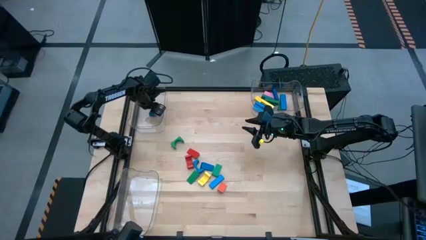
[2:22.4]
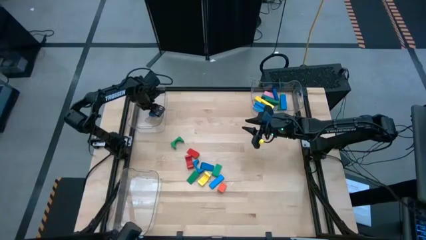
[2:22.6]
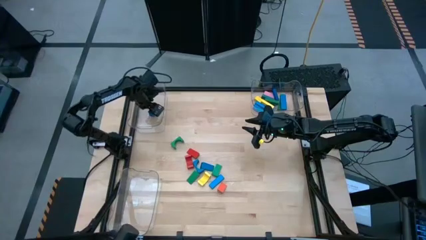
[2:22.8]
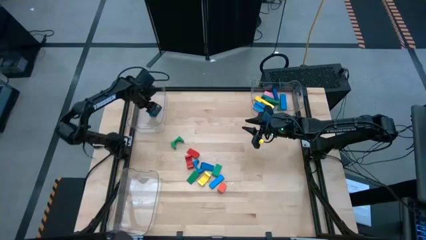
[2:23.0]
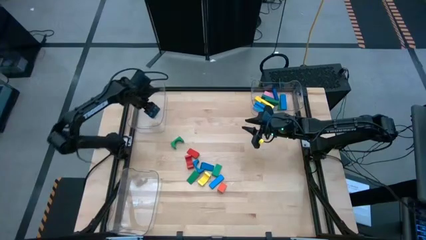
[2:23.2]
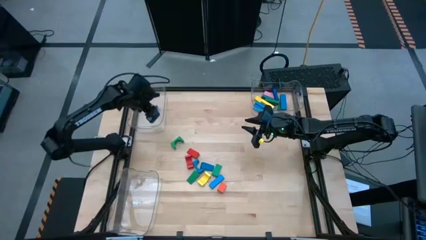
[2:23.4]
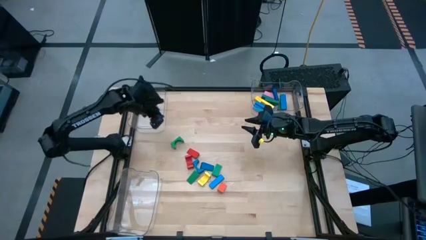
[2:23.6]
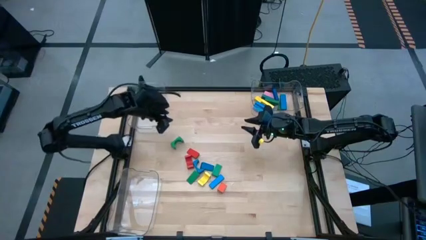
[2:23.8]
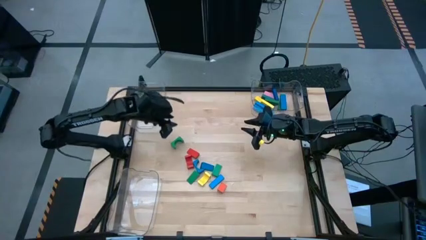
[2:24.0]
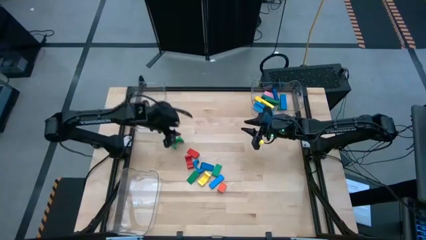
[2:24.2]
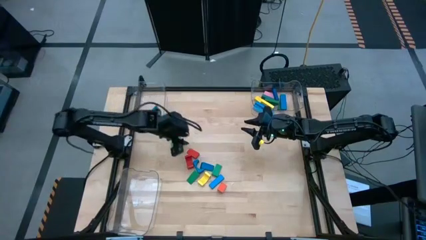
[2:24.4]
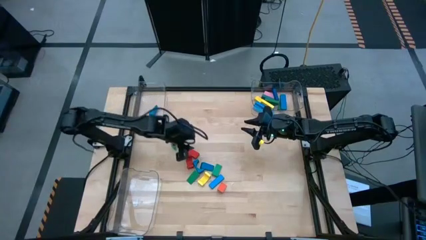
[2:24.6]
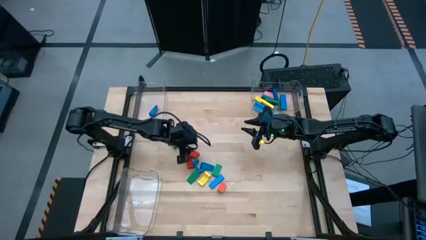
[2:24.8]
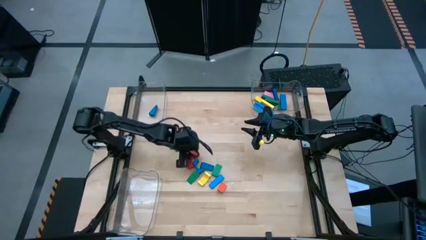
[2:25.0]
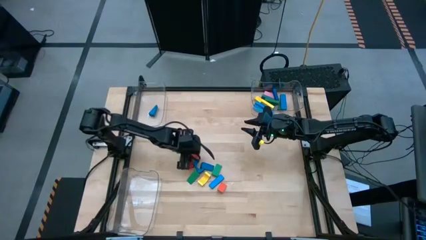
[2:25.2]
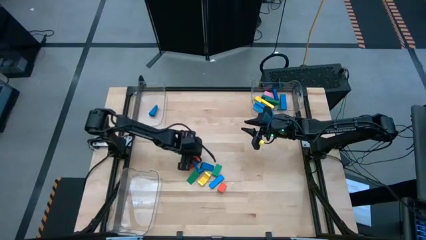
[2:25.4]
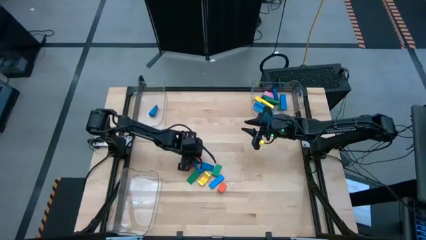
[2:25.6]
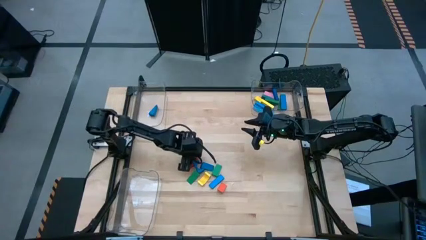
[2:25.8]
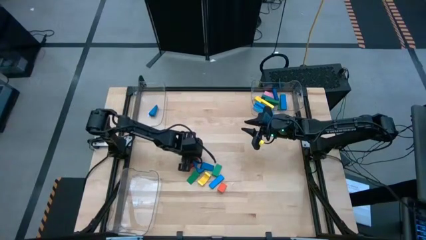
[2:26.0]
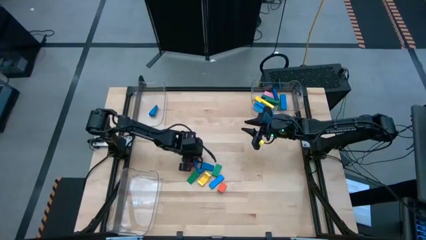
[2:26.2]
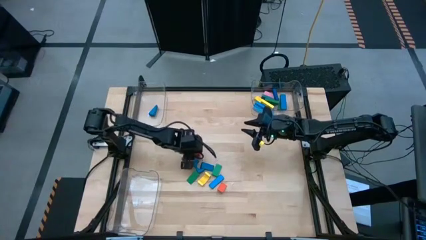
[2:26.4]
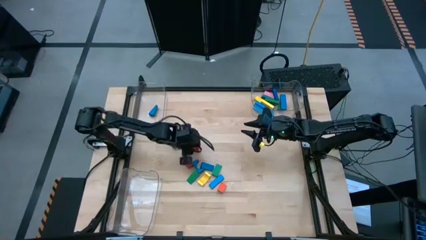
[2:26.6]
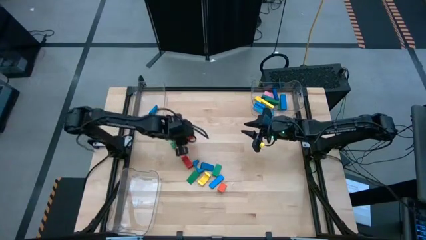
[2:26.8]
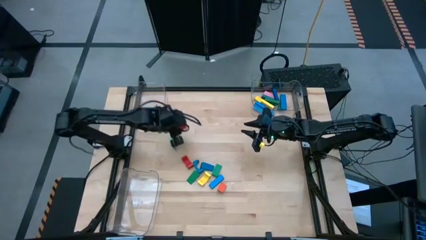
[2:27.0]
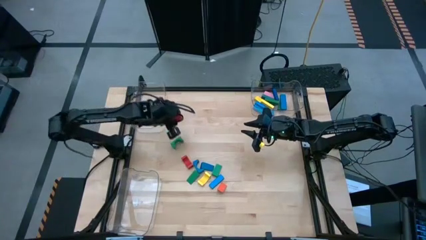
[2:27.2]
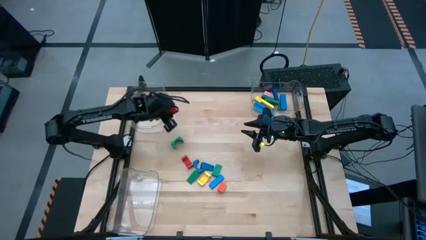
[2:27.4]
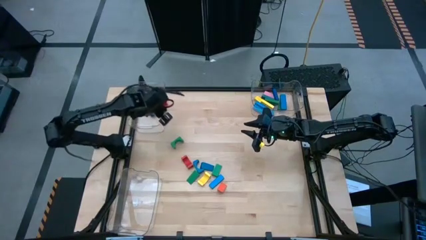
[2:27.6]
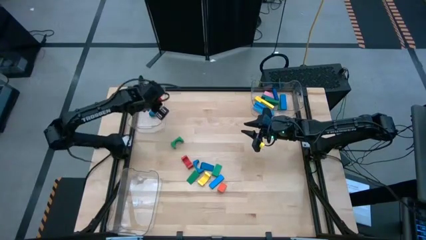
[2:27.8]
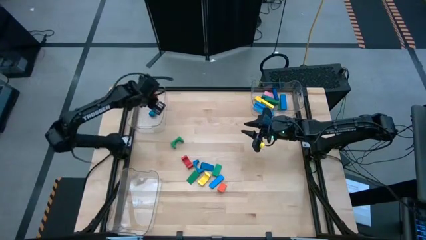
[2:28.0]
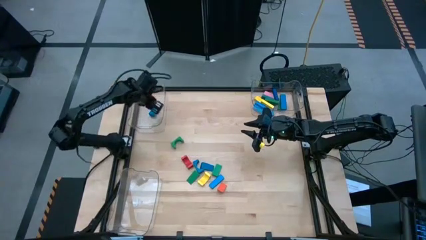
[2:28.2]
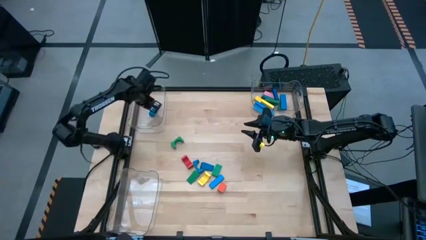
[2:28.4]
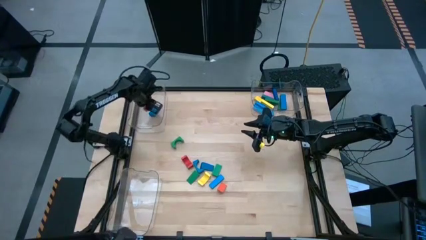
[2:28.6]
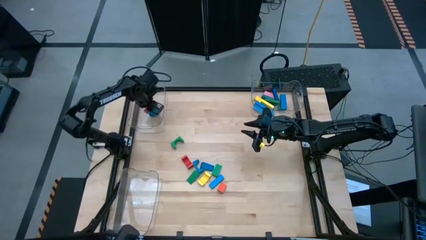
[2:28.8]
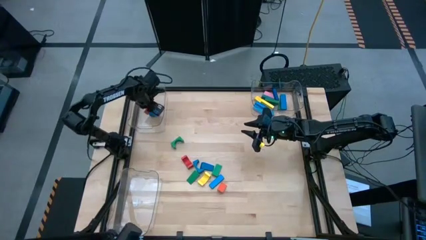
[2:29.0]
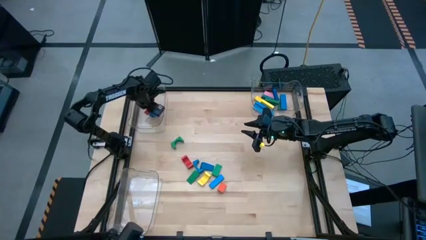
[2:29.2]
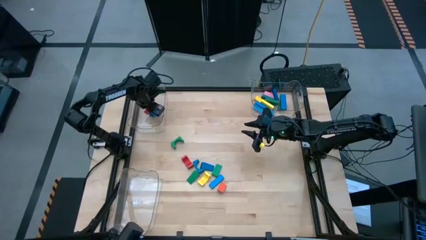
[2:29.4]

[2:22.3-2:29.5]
Task: Sort blocks by size
Put the orange triangle block into the top left transparent bin

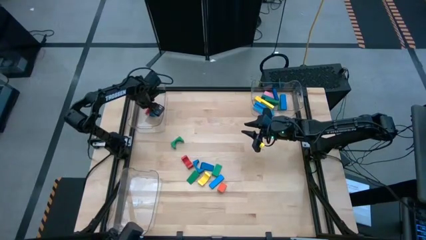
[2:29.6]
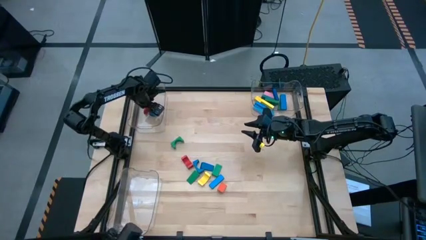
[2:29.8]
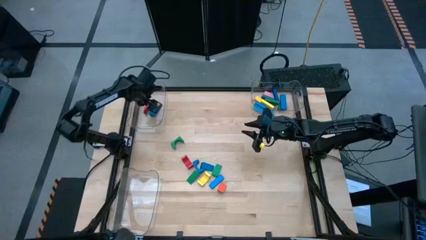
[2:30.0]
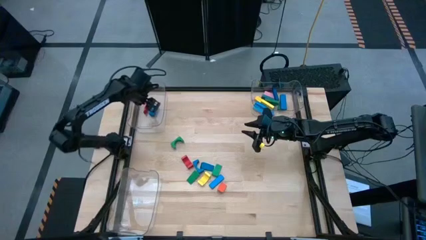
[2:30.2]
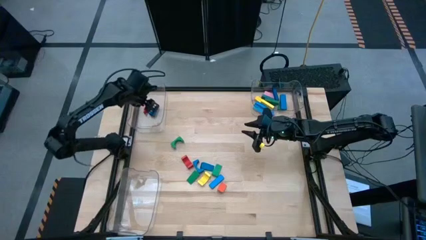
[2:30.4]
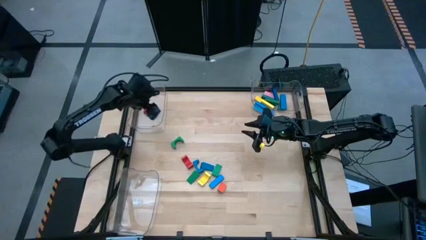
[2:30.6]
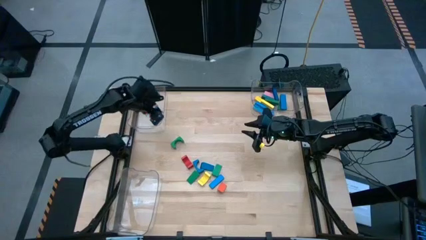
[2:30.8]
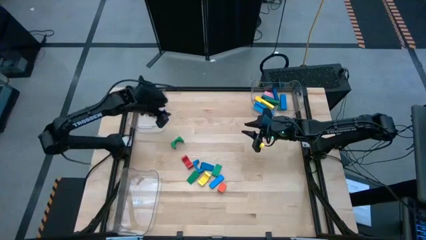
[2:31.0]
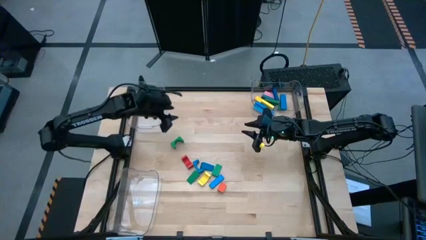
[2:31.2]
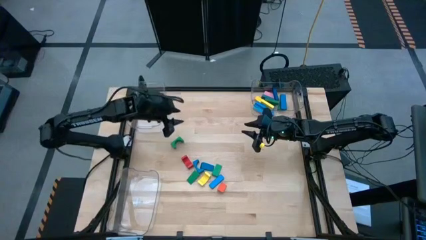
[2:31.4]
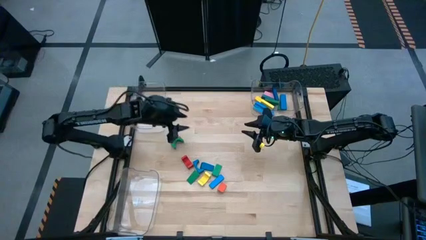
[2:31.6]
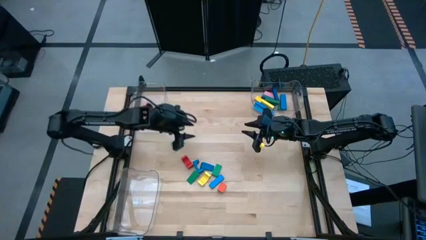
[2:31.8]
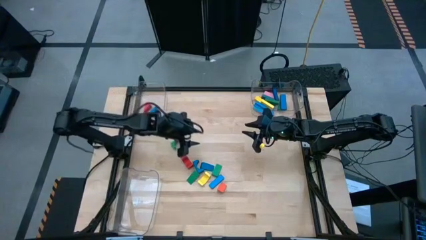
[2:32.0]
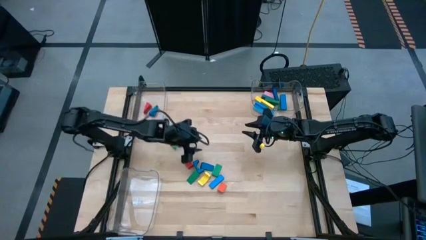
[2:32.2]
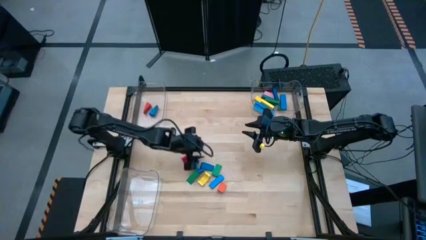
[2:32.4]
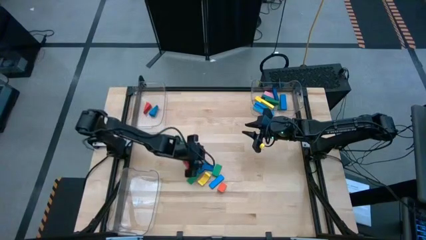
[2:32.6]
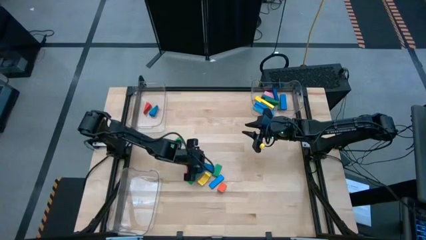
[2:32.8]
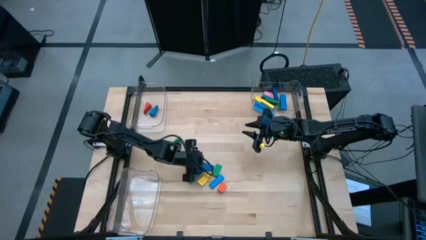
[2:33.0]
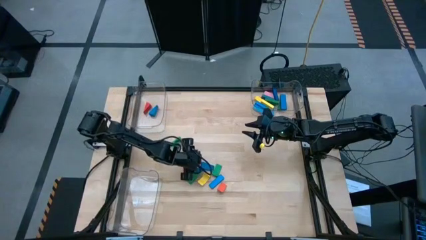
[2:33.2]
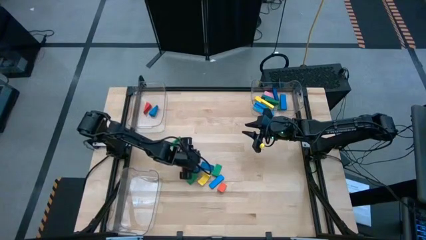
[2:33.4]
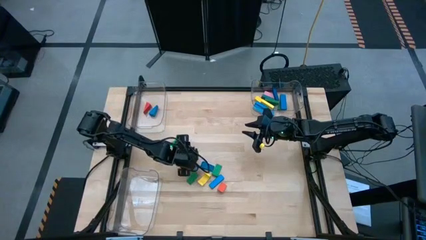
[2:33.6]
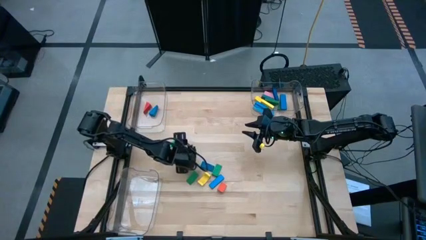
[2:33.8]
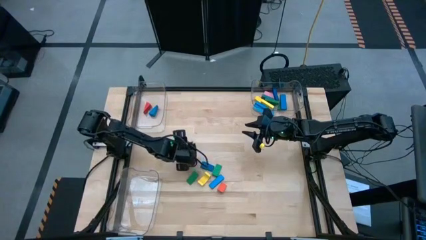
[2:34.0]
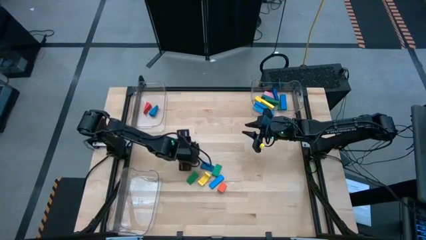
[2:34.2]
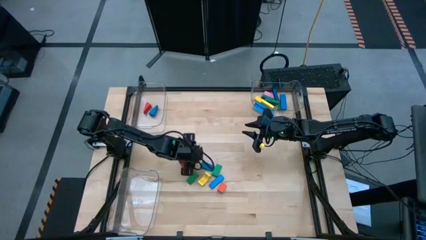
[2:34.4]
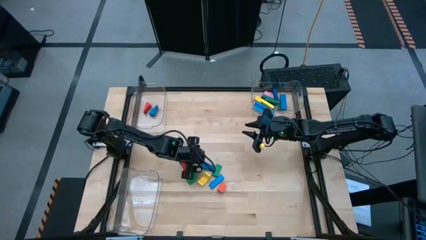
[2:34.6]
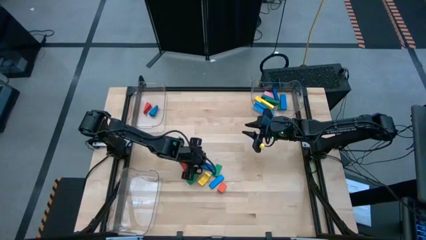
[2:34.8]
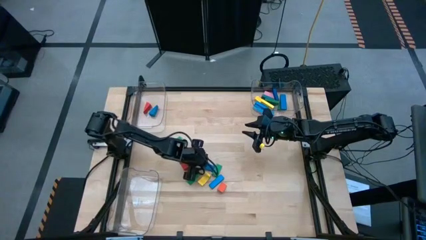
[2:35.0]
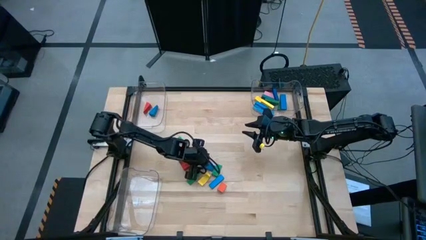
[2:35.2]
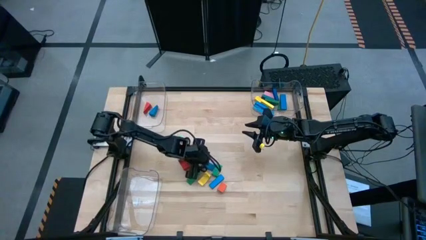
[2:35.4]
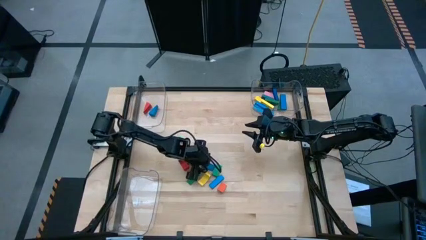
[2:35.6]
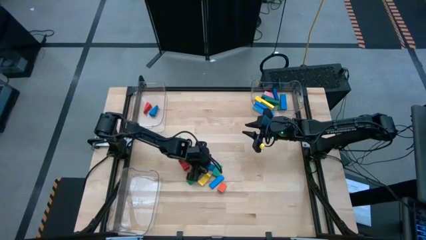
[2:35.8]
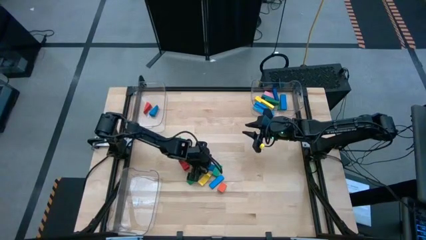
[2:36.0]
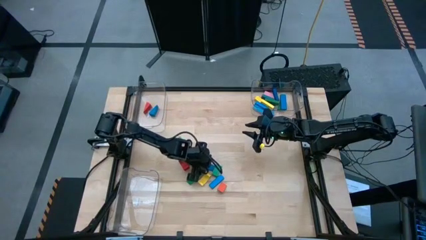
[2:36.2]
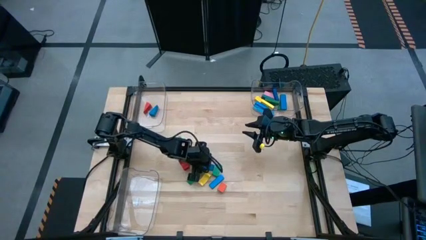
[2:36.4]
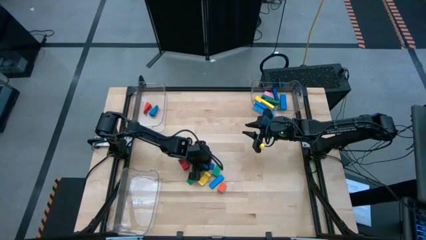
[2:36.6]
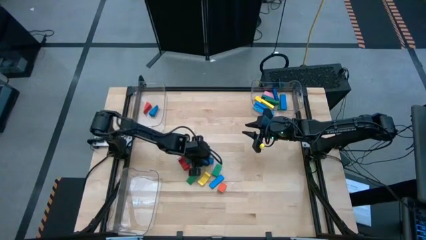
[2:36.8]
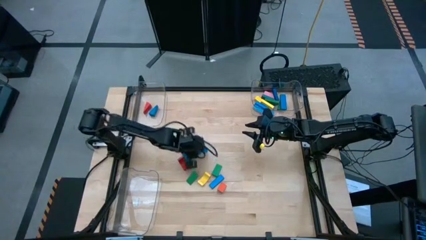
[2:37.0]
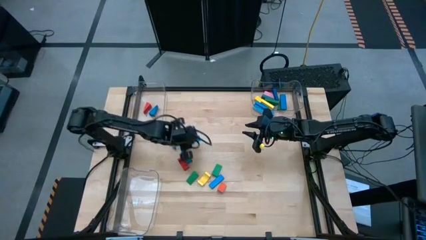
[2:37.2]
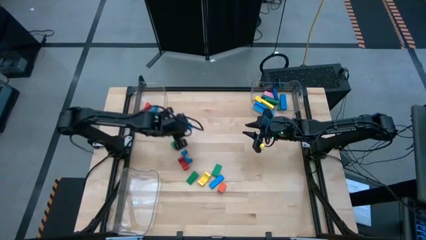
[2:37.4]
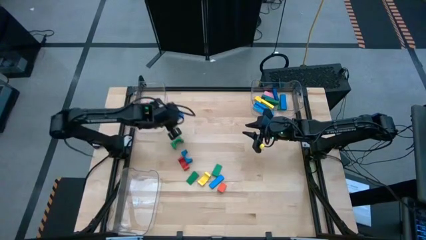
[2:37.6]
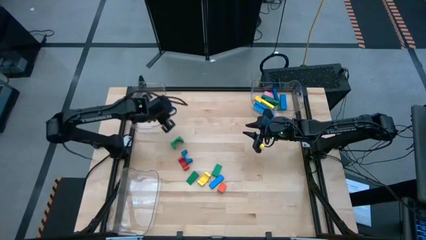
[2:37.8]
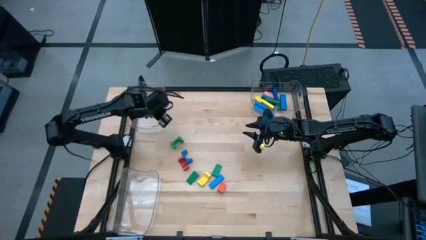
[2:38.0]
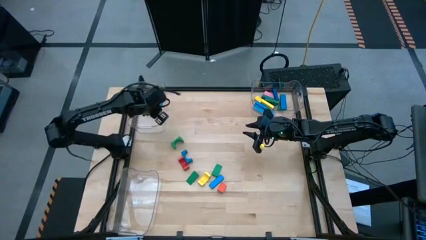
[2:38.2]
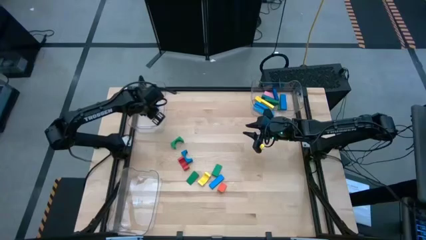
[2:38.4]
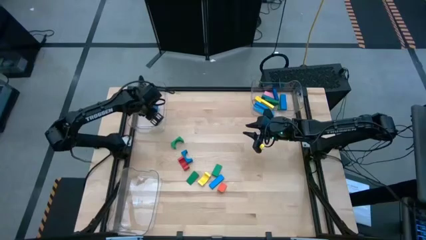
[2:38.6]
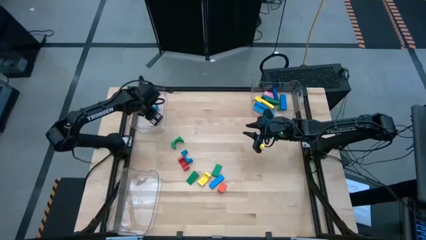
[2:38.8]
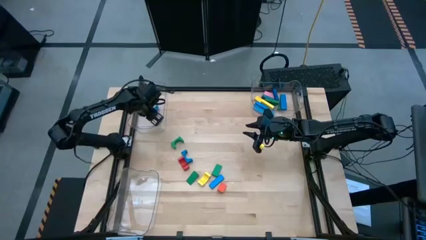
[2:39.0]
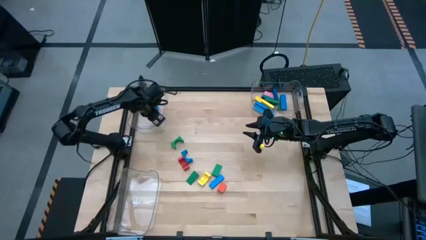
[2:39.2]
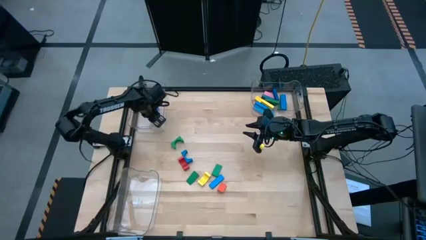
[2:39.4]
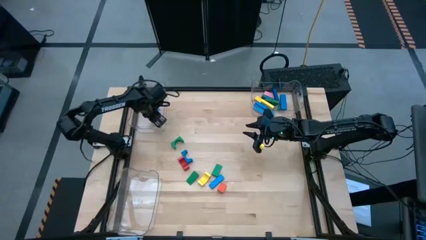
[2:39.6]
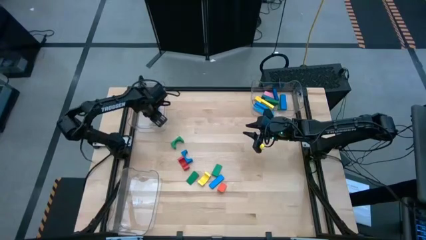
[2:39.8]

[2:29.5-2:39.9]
Put the blue triangle block into the top left transparent bin
